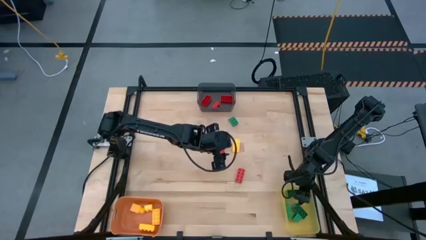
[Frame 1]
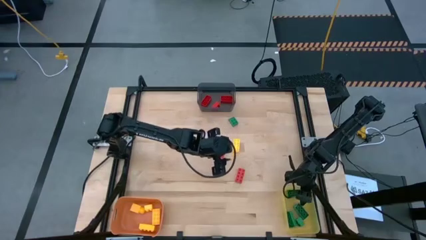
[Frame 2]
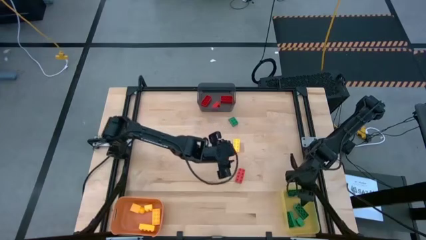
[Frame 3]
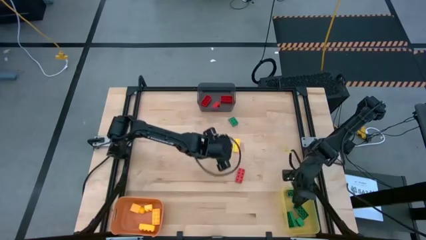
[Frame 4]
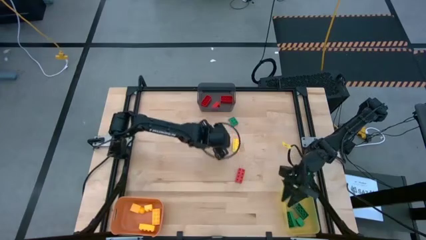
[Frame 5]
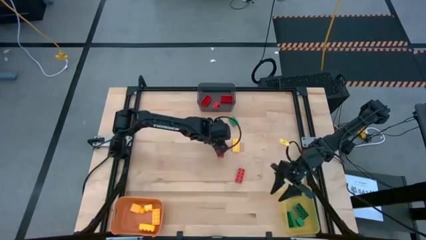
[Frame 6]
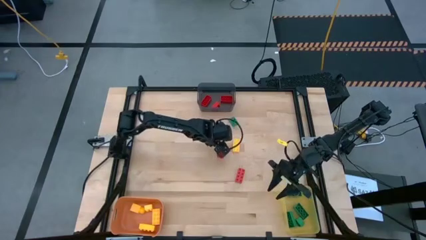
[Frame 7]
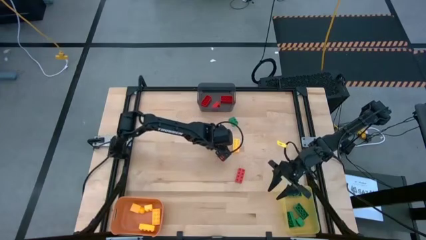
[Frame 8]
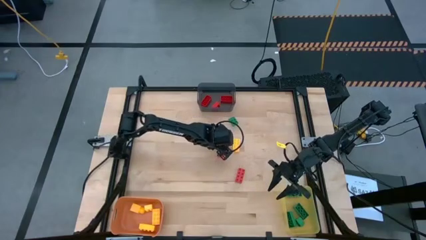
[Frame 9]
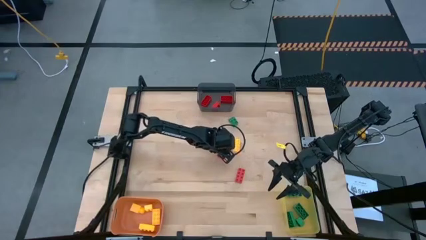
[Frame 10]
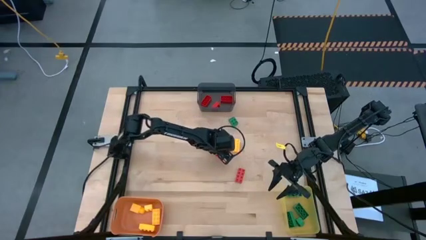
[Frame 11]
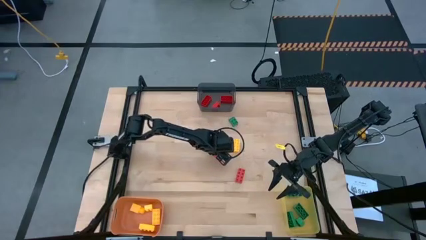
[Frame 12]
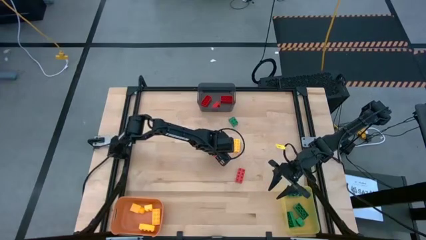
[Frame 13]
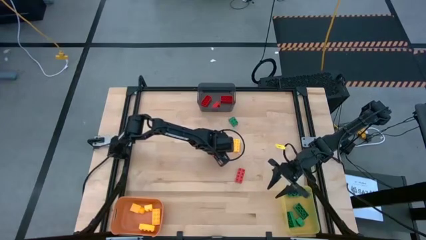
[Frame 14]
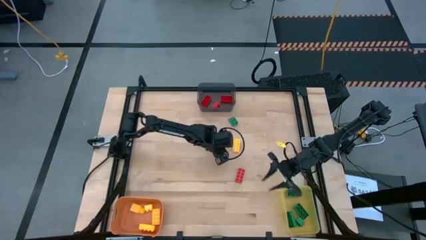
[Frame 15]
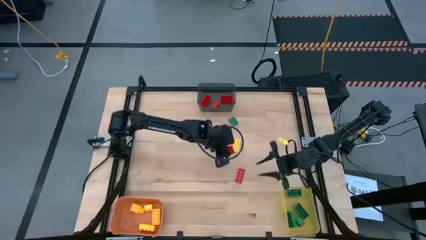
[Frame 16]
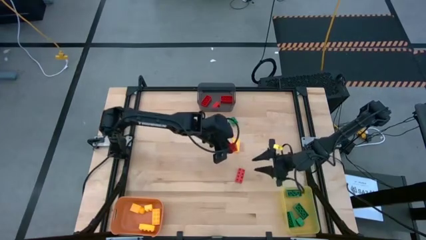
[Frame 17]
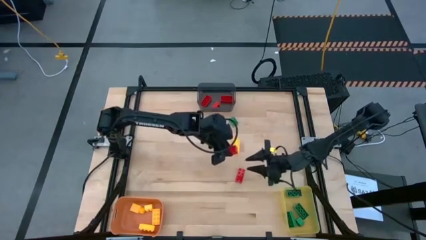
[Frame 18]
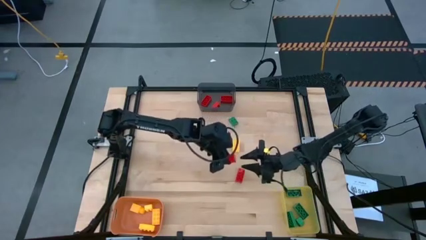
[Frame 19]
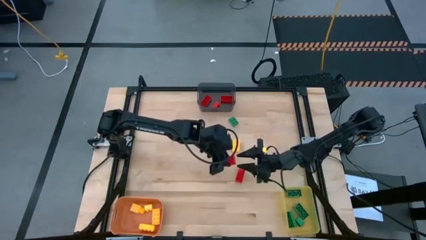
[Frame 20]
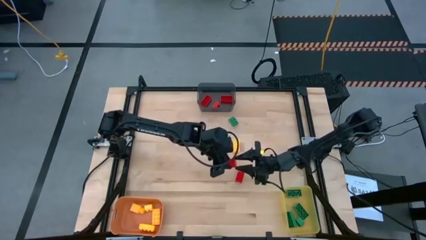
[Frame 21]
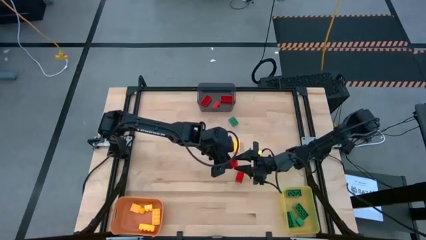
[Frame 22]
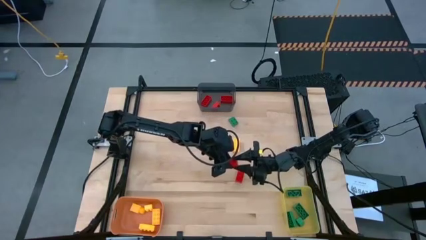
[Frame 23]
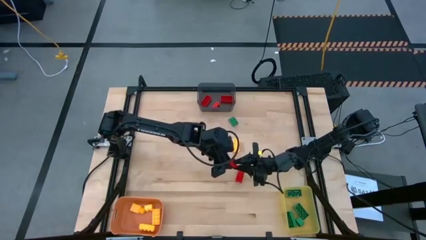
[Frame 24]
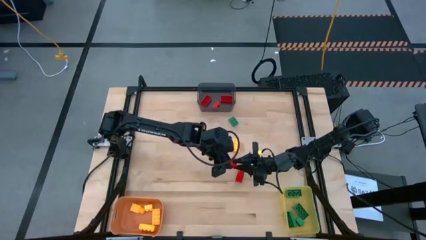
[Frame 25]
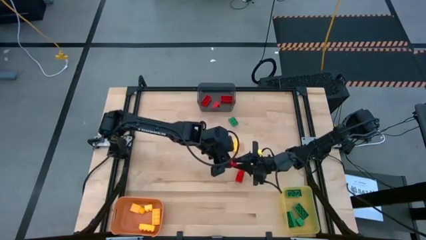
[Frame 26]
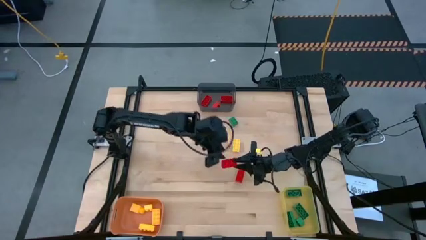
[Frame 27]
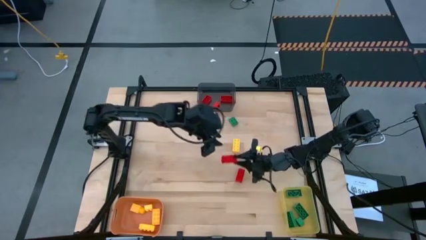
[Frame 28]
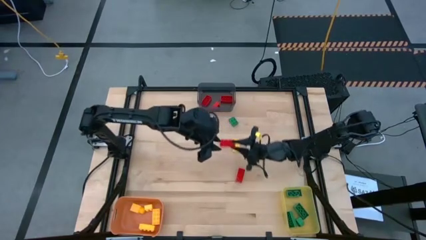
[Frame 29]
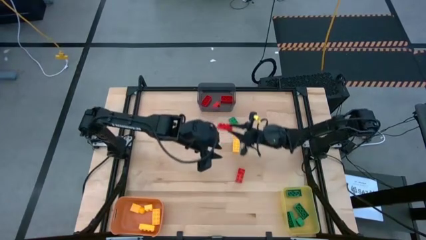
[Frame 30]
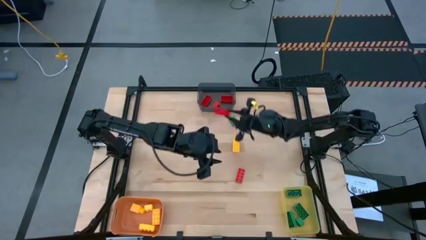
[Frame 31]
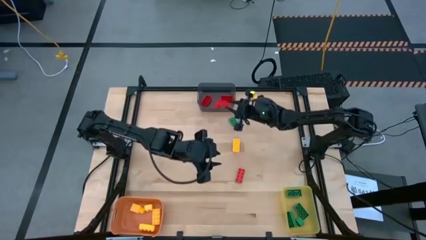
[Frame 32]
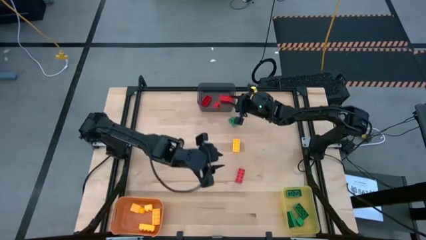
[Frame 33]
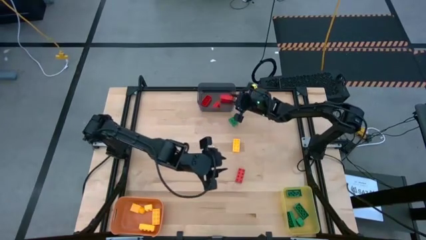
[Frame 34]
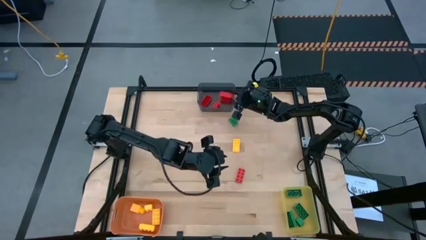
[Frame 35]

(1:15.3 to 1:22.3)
Task: Sort & place blocks by color
Put the red game piece into the black bin

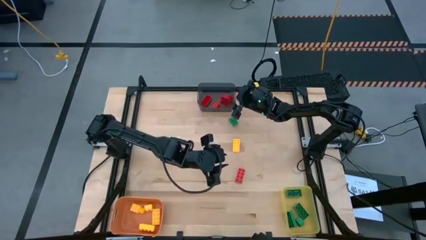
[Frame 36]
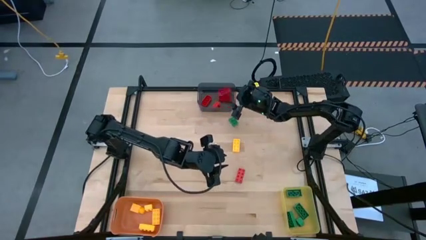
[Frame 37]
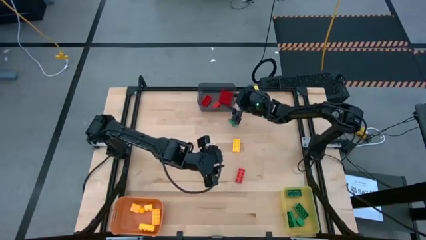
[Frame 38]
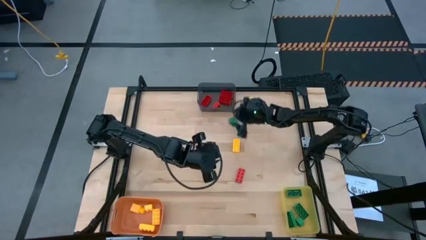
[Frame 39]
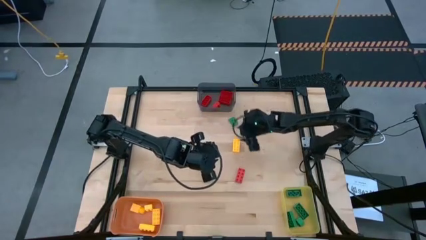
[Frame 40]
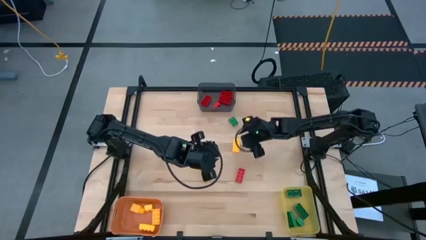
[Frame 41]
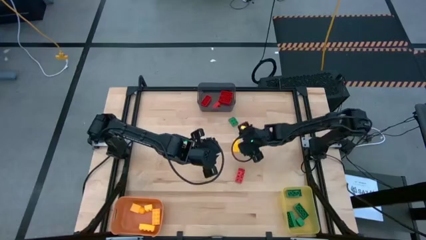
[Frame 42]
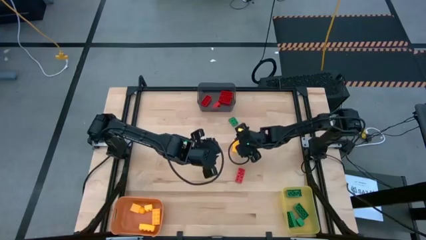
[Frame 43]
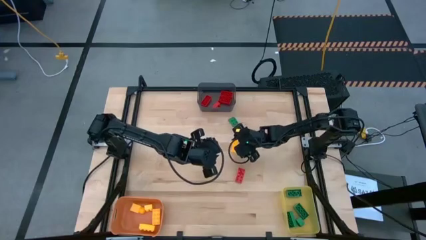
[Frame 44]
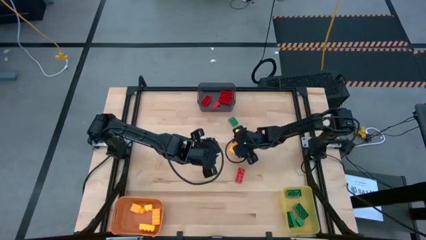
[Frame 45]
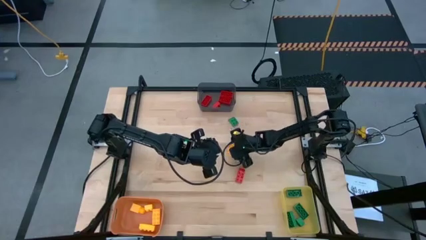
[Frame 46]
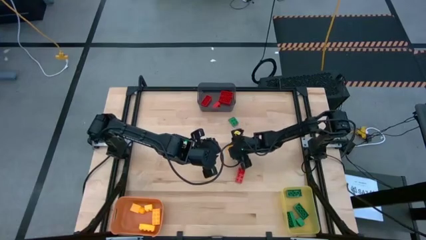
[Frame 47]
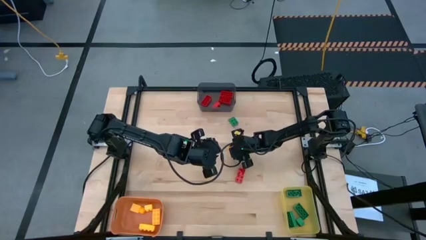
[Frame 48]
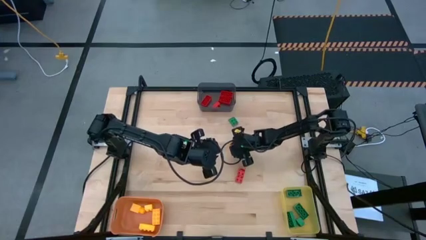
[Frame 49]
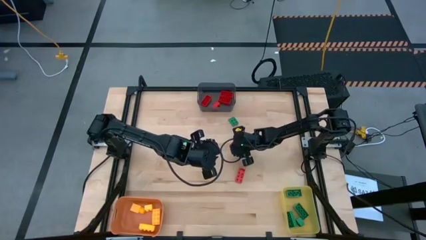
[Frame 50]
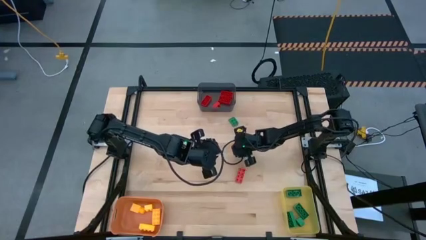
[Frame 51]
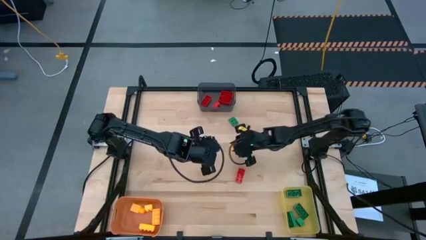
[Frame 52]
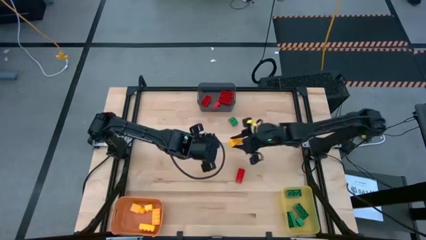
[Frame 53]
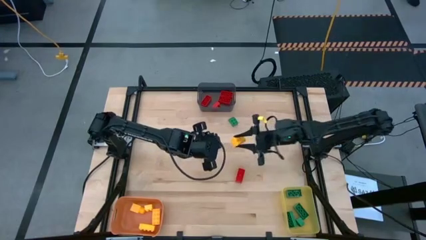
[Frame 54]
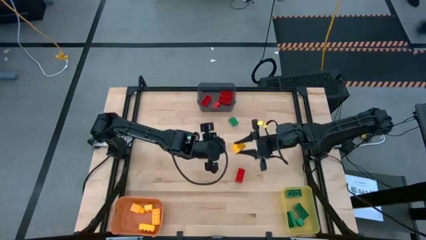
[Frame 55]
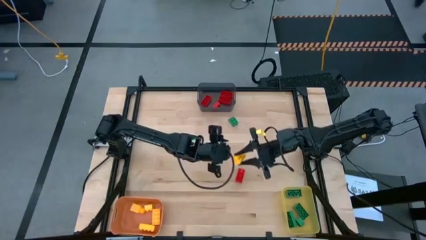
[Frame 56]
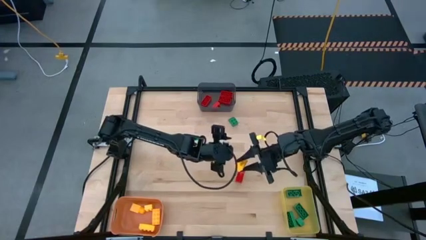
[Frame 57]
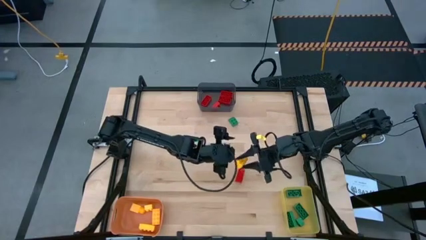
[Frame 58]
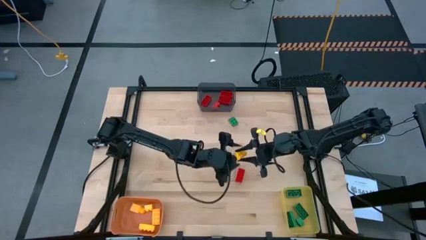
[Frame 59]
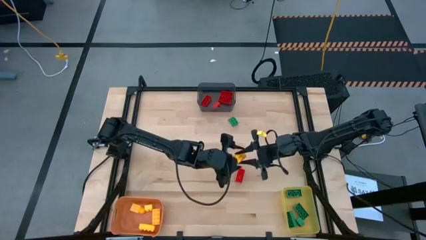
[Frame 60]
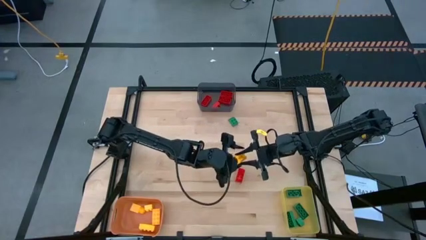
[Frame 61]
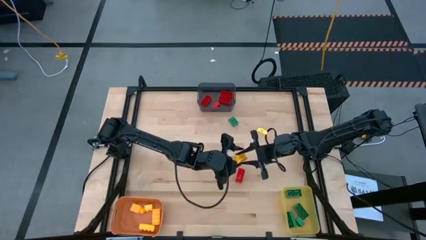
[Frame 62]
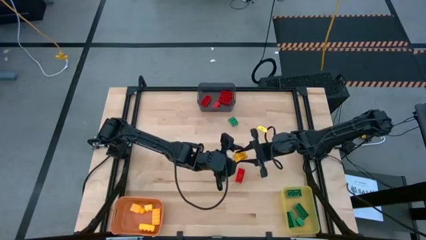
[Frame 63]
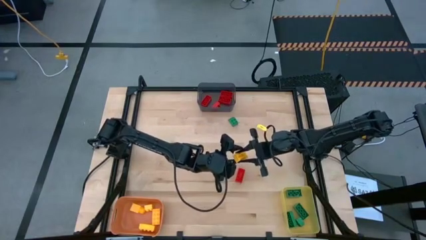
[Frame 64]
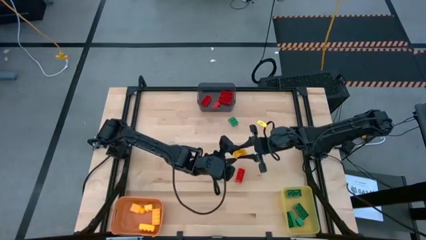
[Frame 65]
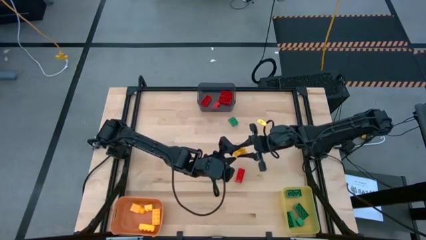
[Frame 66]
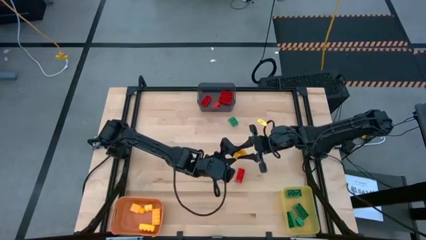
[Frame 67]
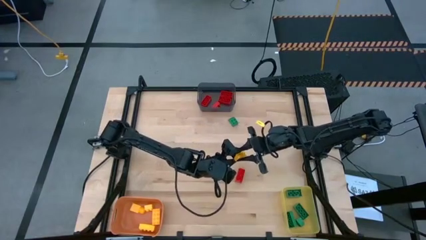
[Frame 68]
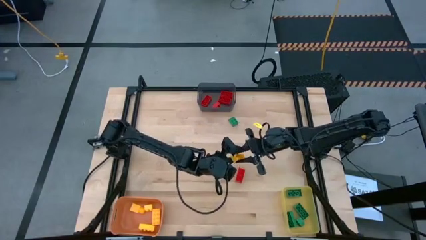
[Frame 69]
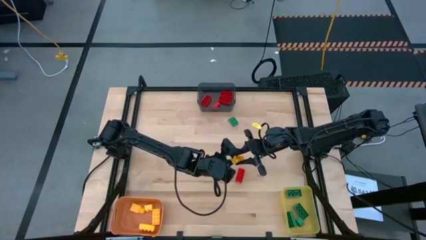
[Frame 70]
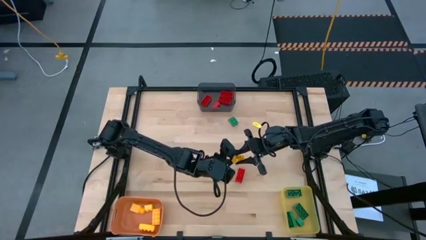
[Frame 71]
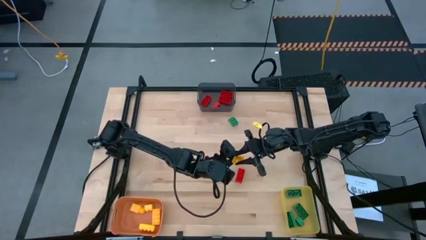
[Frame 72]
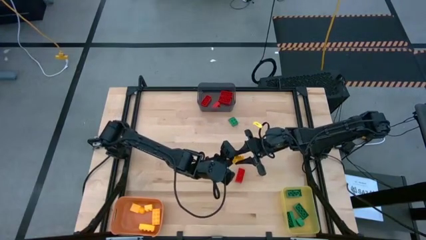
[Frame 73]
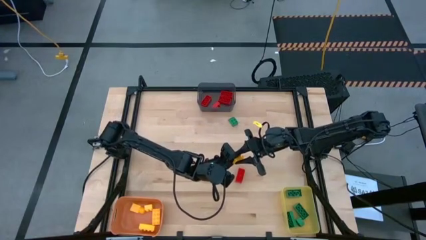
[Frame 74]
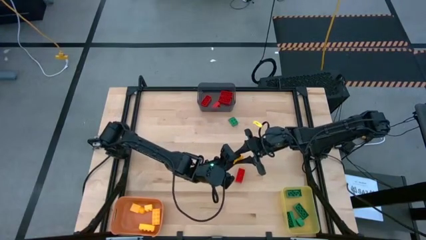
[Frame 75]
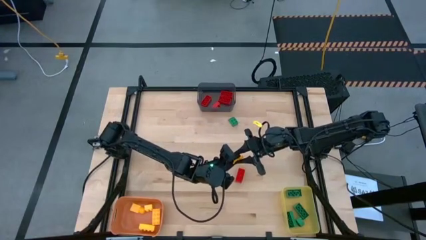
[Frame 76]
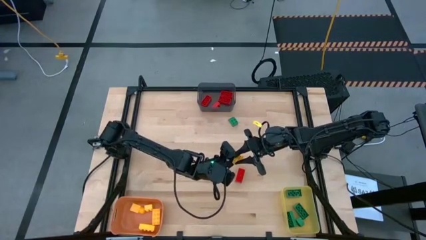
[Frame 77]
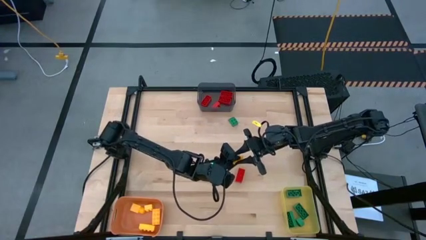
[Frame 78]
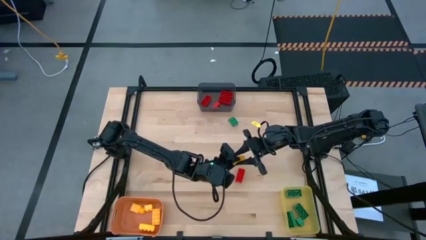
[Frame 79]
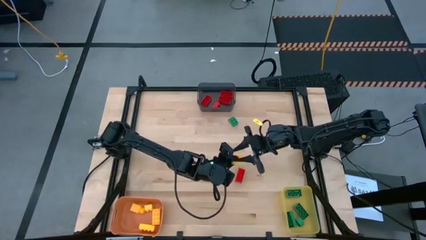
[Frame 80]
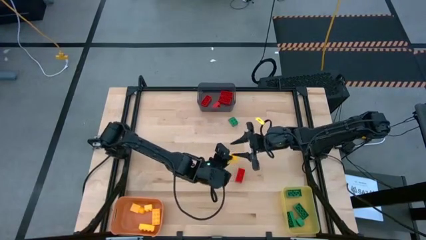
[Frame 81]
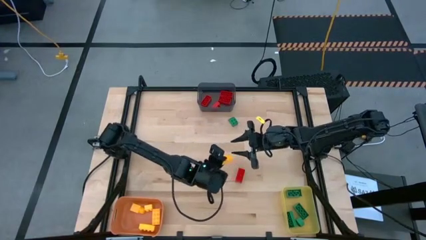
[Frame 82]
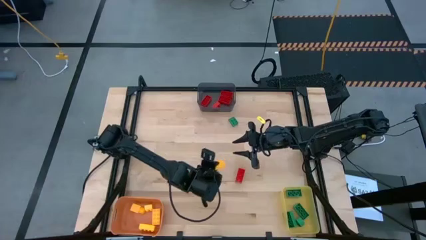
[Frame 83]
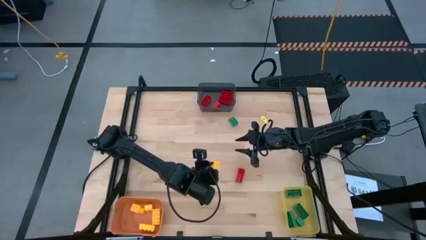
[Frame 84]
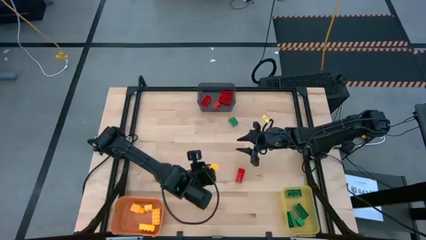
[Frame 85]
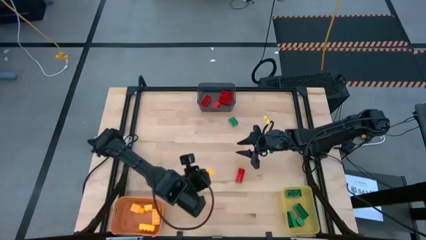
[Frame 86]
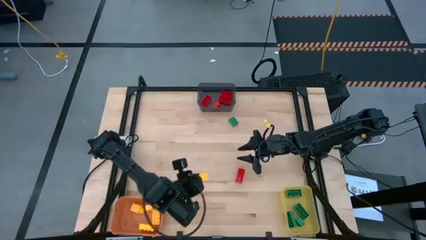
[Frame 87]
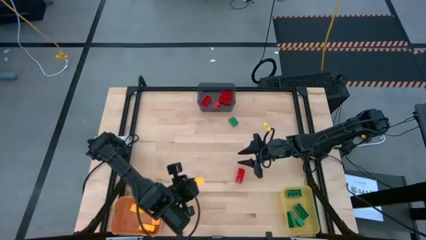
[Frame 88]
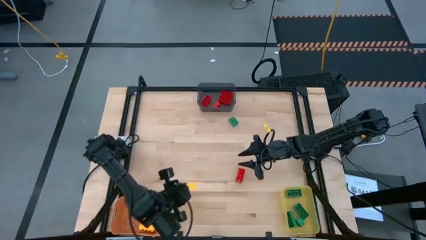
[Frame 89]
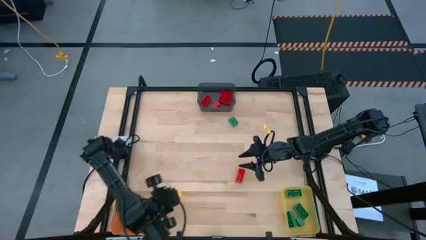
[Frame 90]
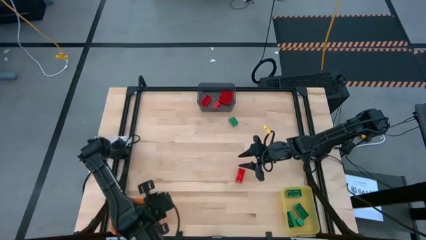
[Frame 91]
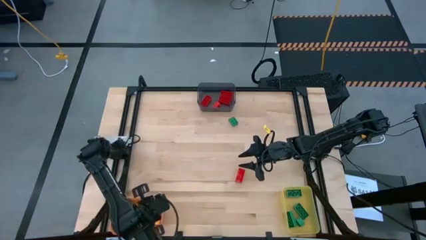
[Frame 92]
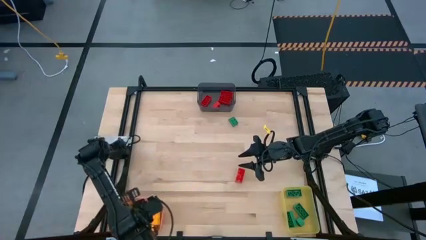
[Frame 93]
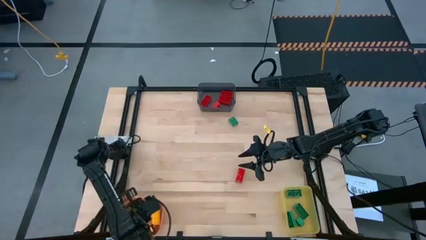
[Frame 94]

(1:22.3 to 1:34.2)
Put the yellow game piece into the orange bin
